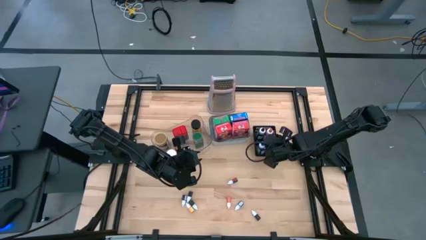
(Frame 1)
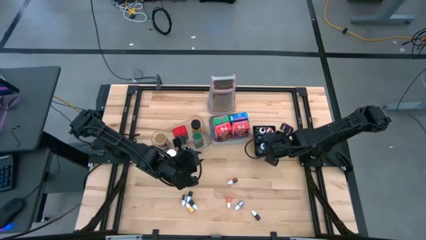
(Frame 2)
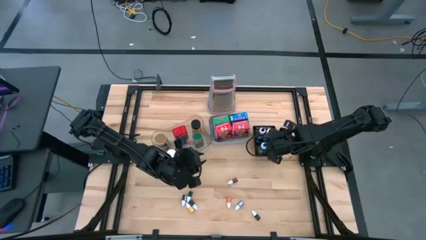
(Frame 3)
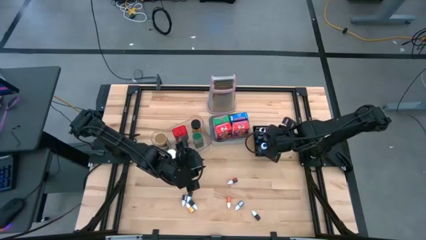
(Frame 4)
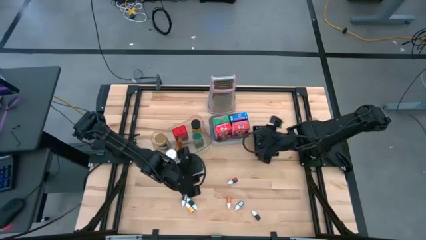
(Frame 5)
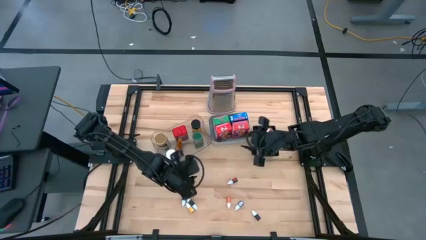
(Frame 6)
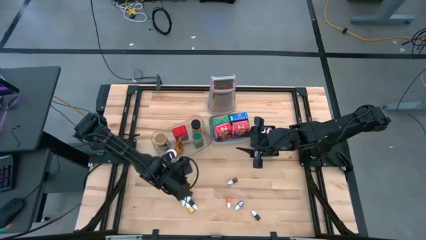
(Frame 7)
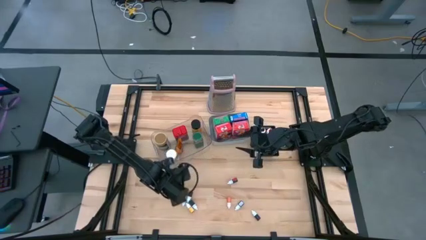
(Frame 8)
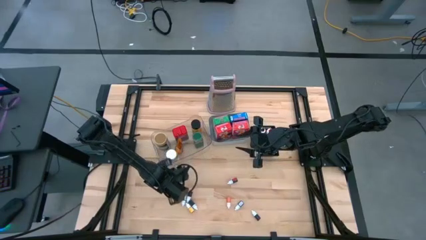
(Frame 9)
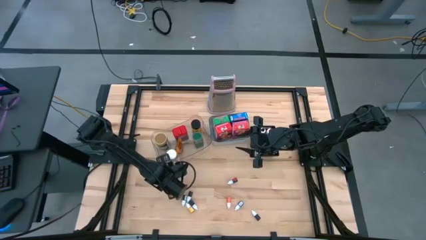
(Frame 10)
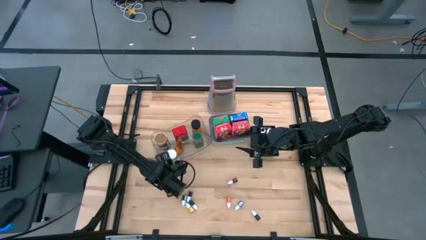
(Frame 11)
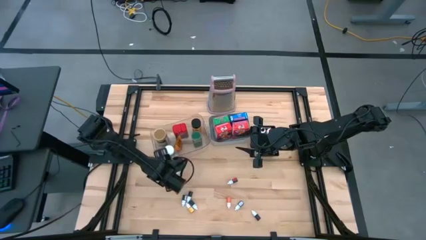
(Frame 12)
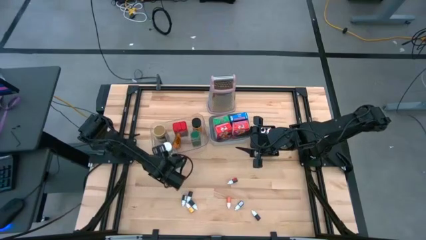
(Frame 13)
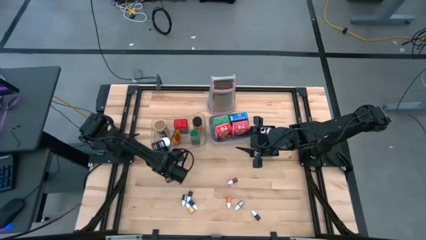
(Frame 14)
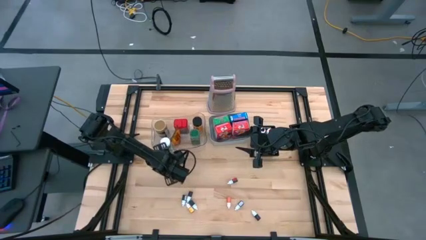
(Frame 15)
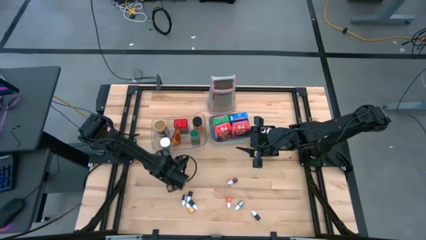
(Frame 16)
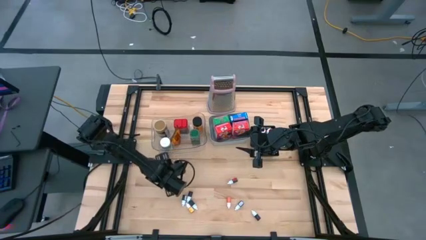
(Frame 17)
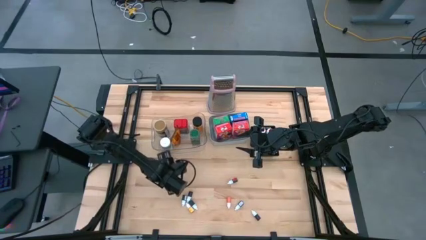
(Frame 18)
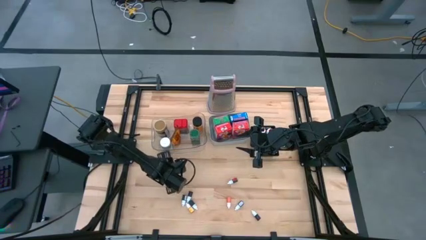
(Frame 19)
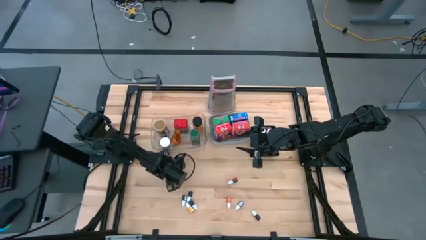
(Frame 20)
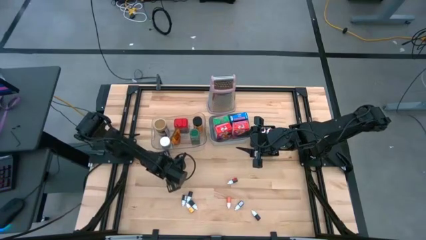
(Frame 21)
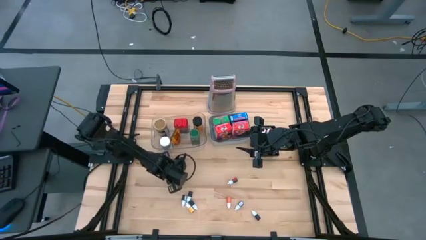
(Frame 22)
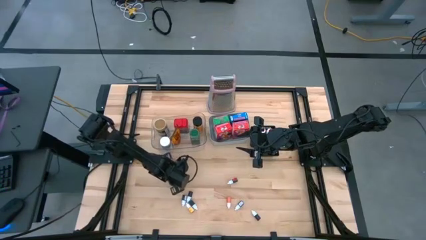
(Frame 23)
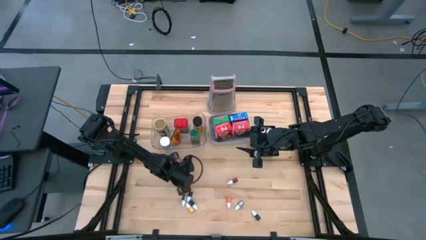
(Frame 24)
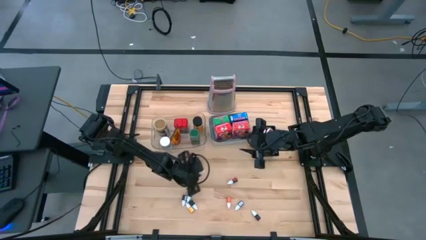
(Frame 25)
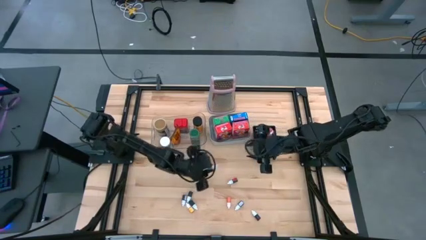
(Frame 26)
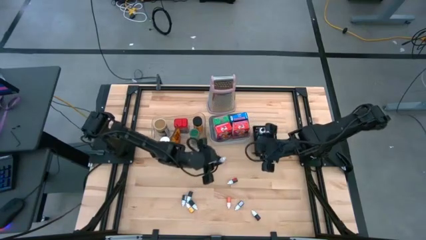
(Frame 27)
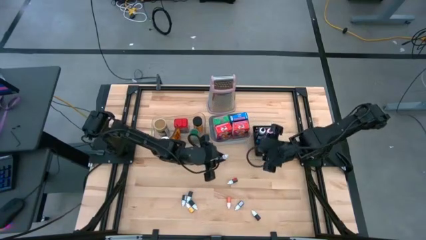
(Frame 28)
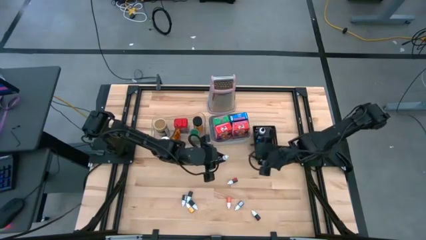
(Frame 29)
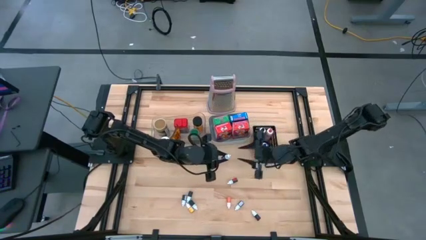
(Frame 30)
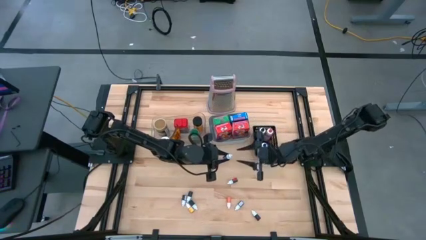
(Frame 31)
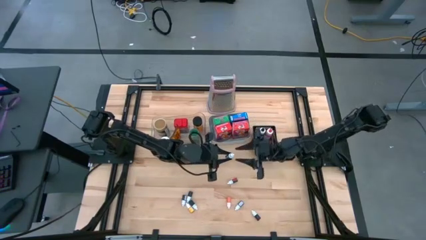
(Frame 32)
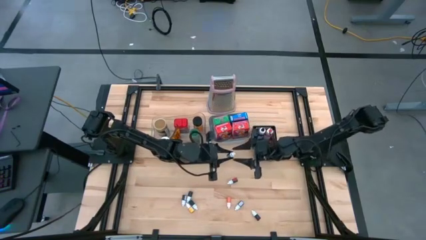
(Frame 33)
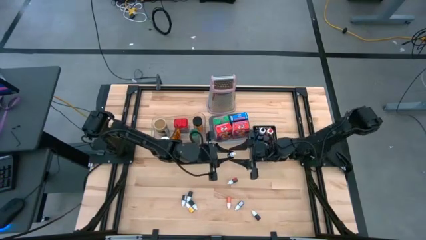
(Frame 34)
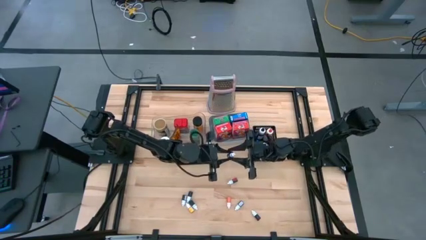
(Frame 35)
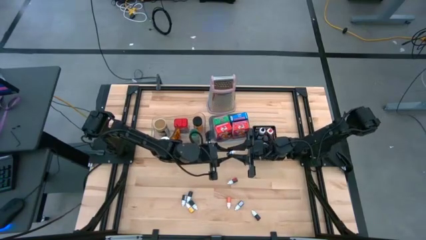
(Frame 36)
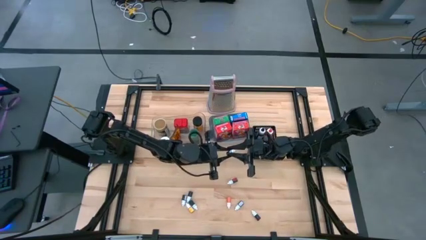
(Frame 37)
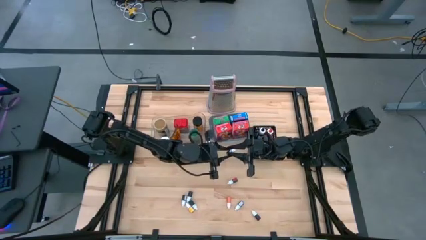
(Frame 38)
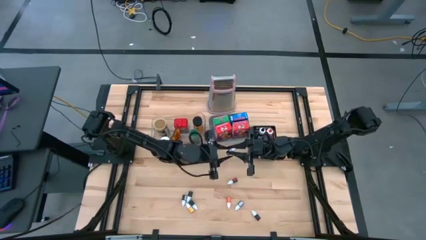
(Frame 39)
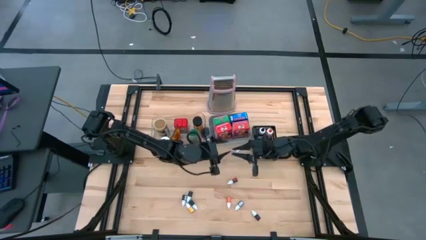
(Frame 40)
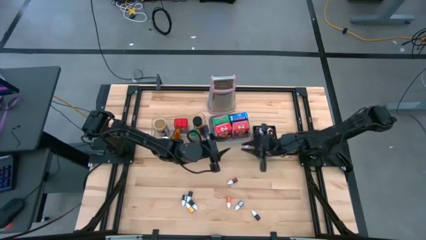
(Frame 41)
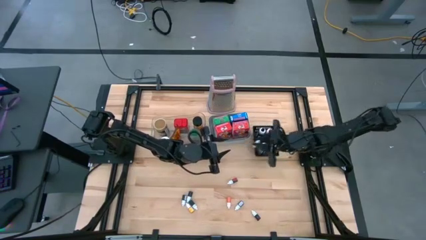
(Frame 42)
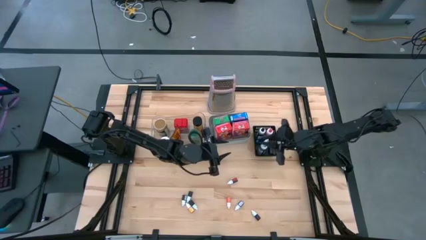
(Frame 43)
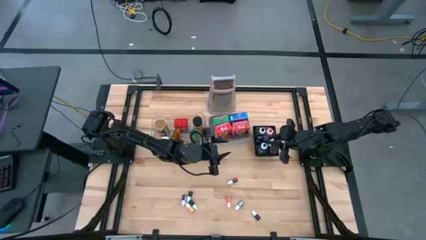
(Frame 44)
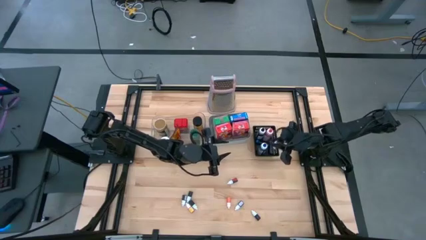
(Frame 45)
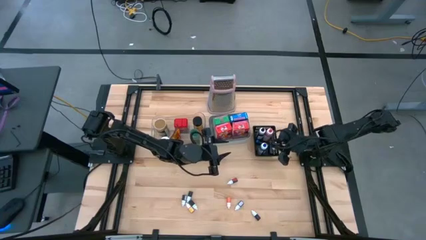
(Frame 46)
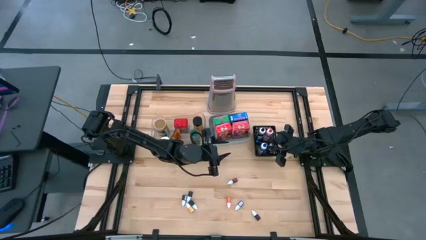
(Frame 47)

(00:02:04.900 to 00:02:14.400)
Task: Pick & Place Kitchen Items
Put the top small green food coloring bottle into the black basket

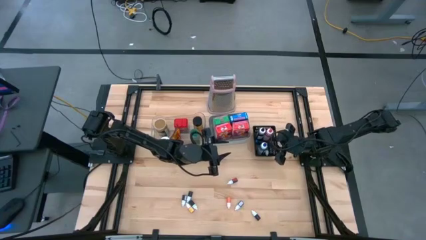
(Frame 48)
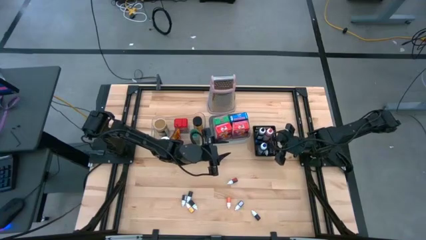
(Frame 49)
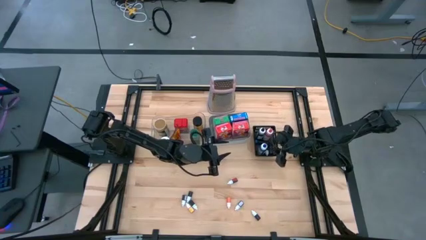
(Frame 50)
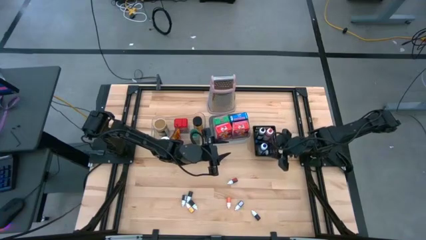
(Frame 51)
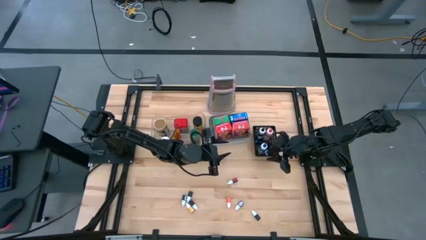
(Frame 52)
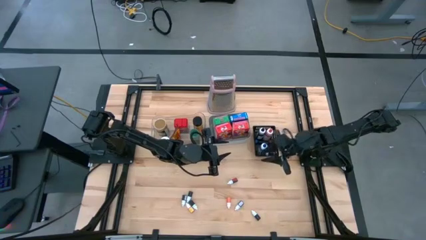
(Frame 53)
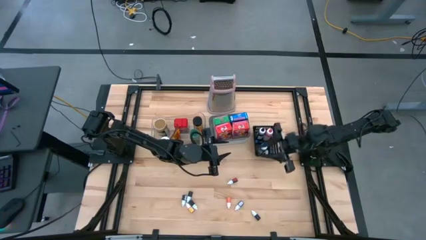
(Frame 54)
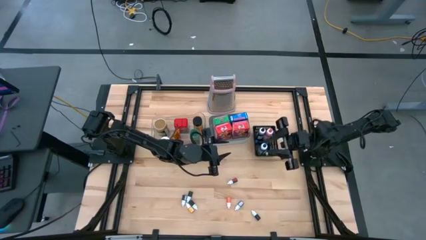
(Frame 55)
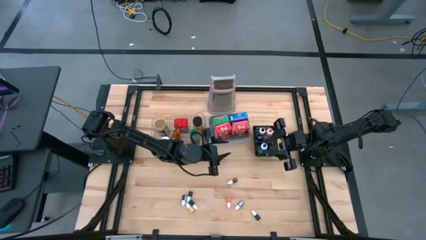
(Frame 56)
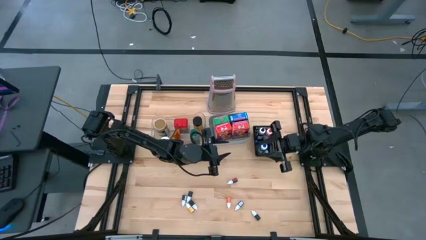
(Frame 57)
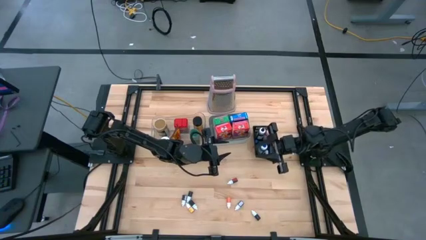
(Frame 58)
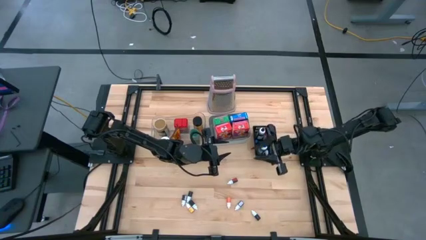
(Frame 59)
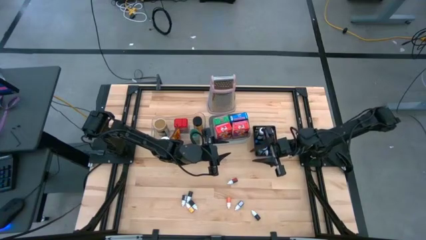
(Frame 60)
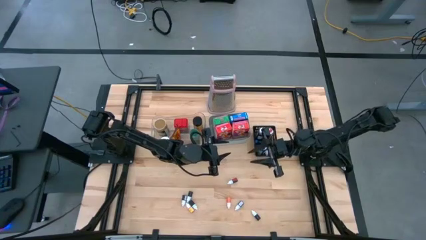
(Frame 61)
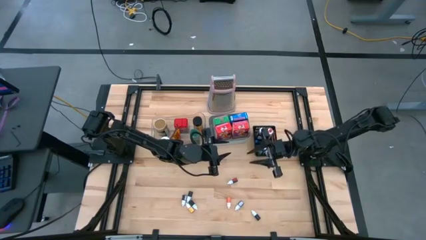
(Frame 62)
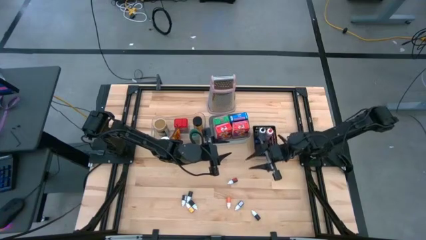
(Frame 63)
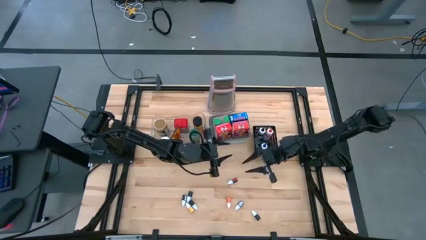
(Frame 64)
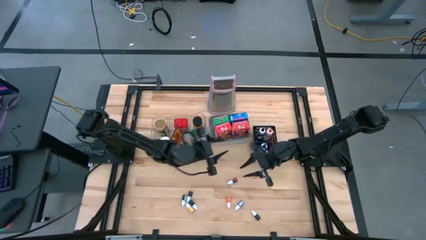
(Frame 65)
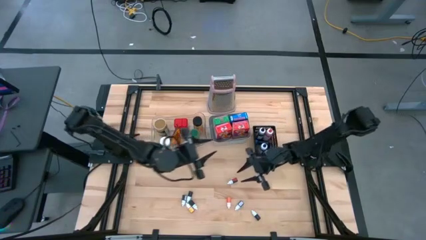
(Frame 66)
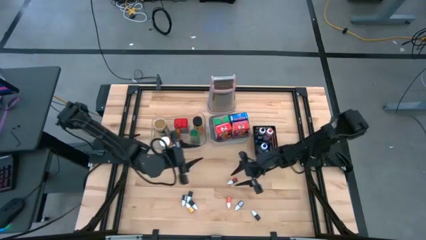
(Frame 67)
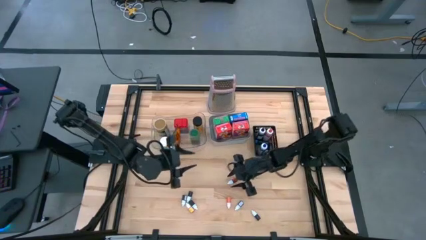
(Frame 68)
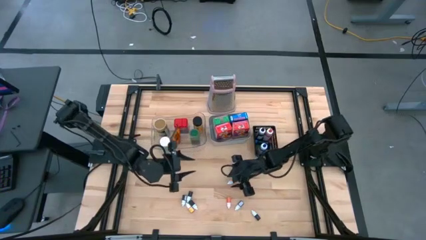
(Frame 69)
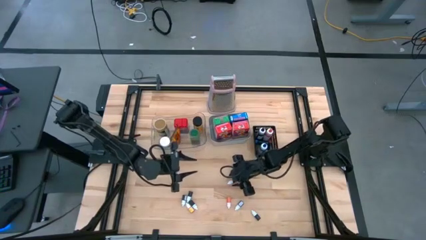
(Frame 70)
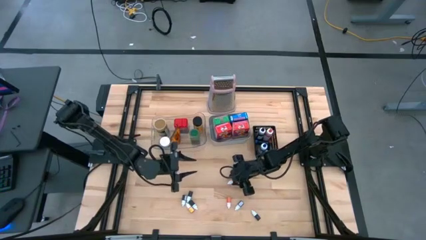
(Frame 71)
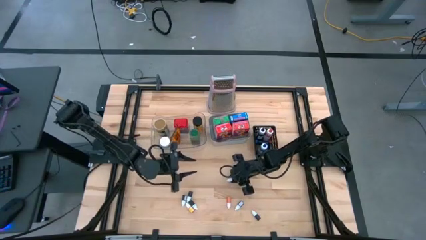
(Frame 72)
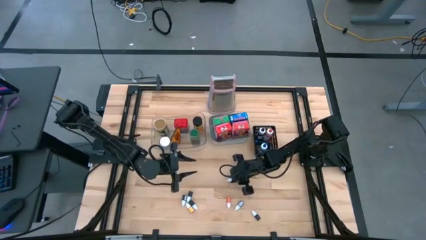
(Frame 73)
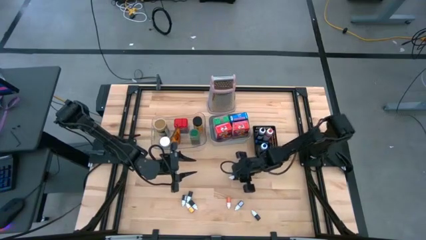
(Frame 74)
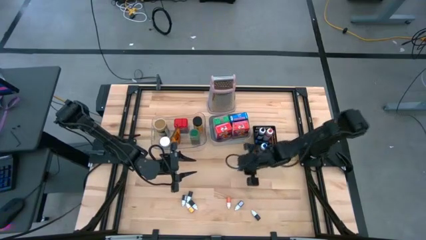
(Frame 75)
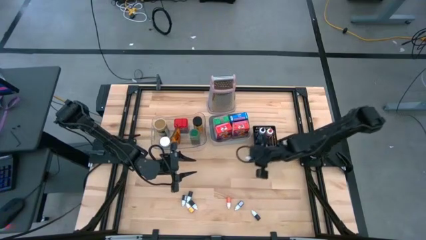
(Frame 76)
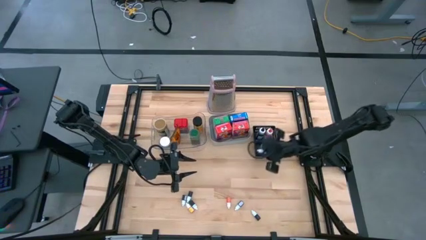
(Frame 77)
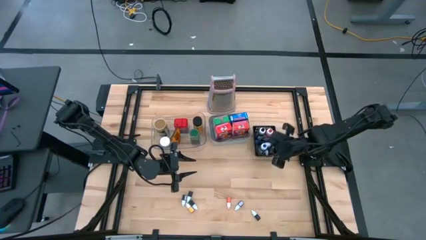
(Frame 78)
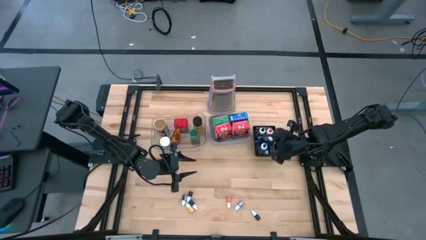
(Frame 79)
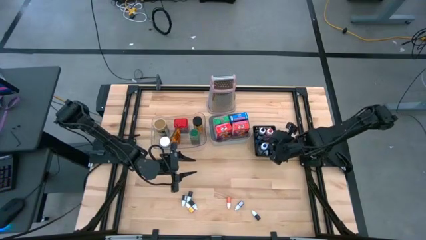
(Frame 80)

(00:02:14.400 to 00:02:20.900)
Put the top small red food coloring bottle into the black basket
